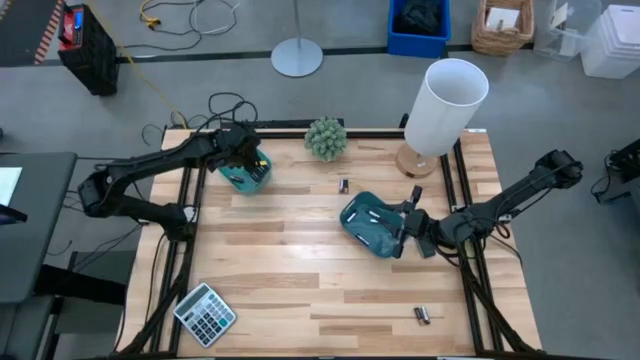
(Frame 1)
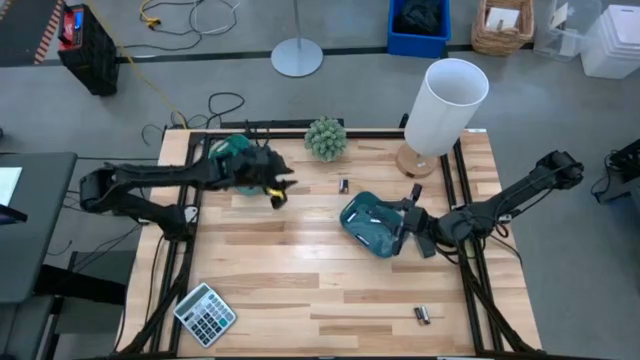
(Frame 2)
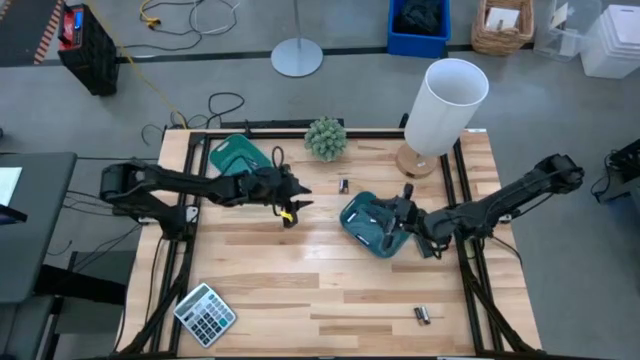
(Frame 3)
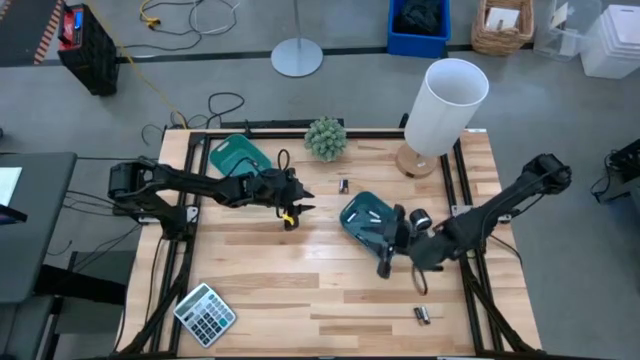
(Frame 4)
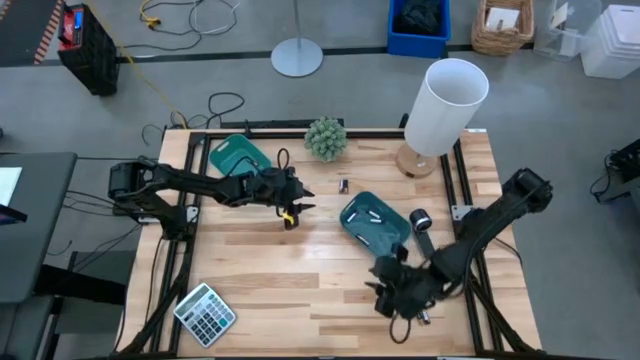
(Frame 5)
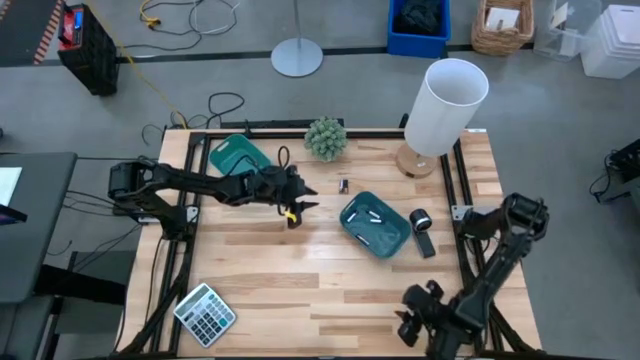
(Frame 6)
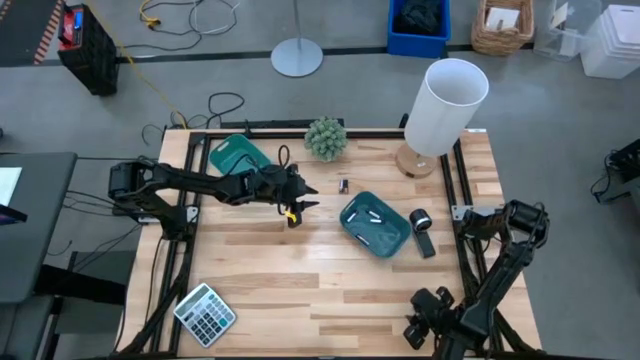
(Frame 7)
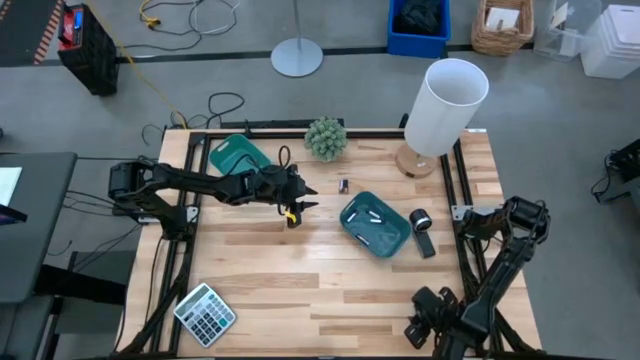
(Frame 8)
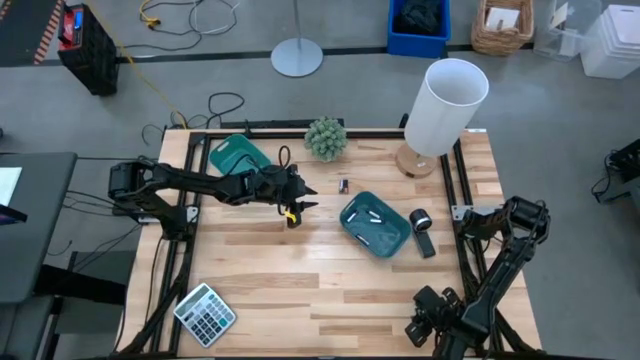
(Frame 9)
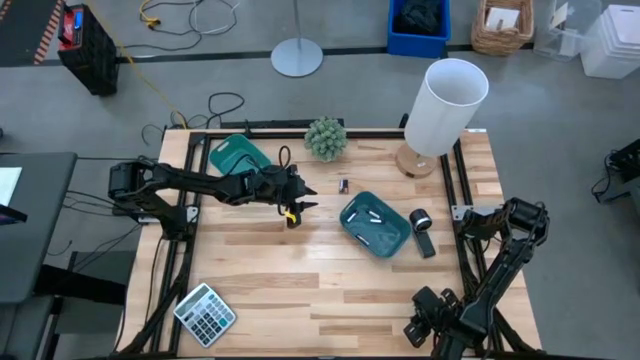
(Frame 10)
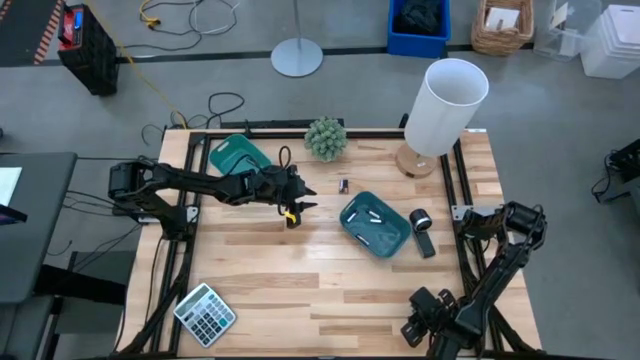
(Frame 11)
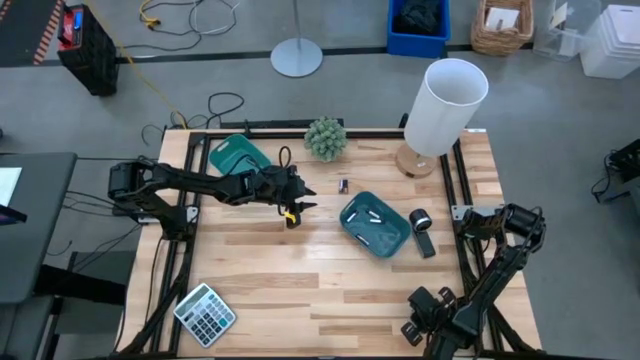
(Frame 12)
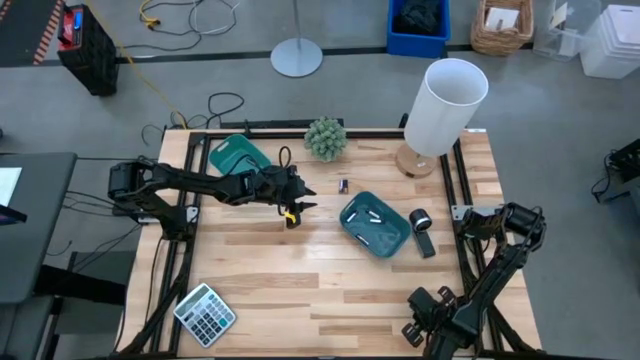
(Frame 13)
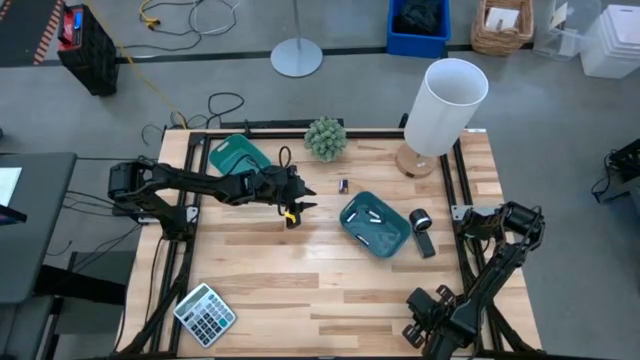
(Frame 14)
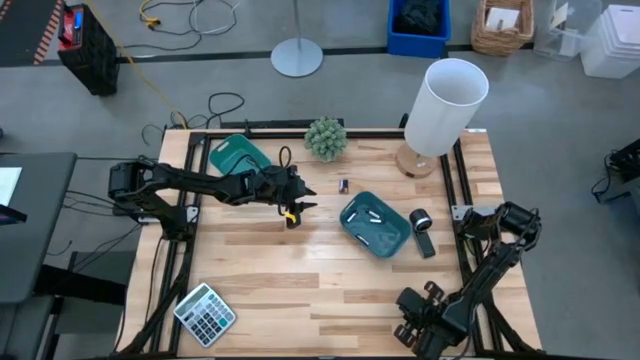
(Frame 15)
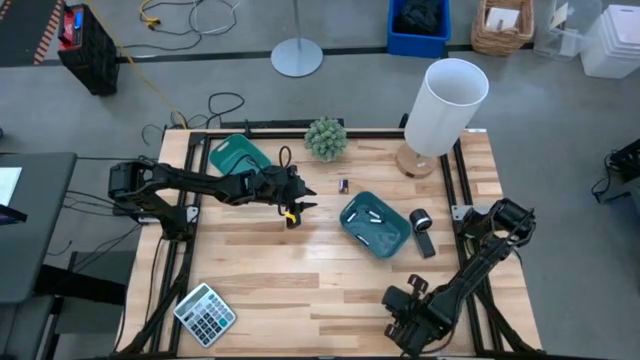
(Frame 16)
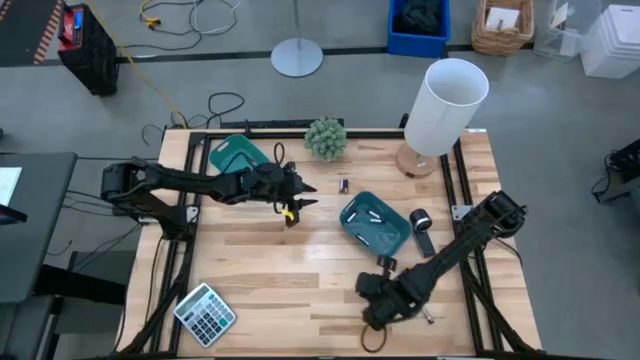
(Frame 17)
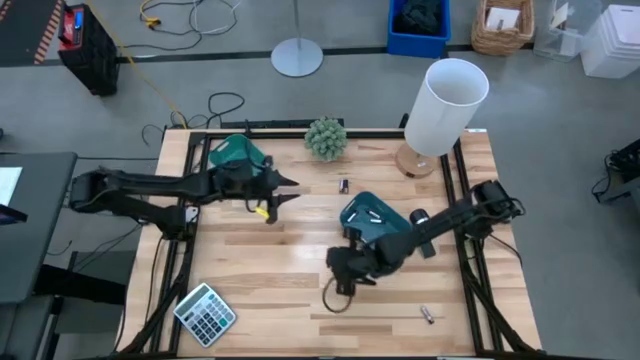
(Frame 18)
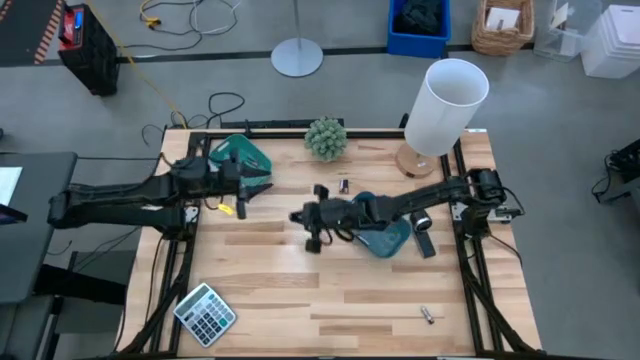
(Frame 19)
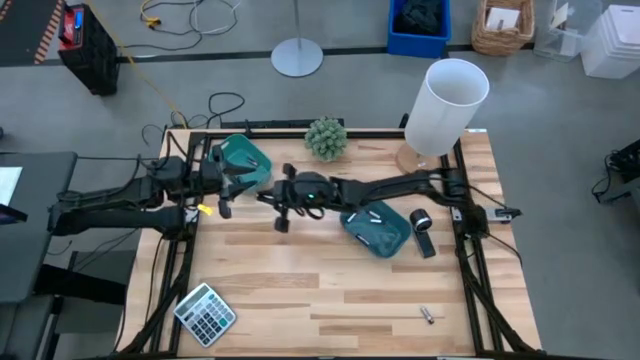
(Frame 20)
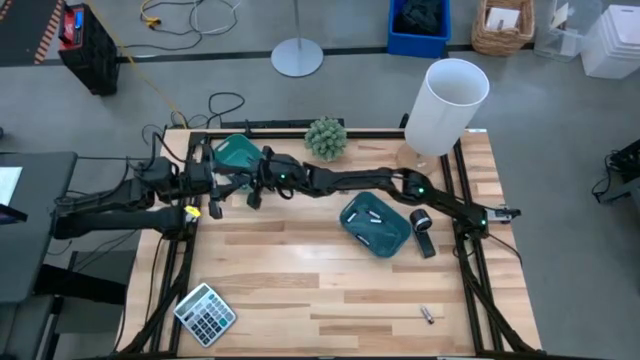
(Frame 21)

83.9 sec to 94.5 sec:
Task: Sort batteries
Put the black battery into the green bin

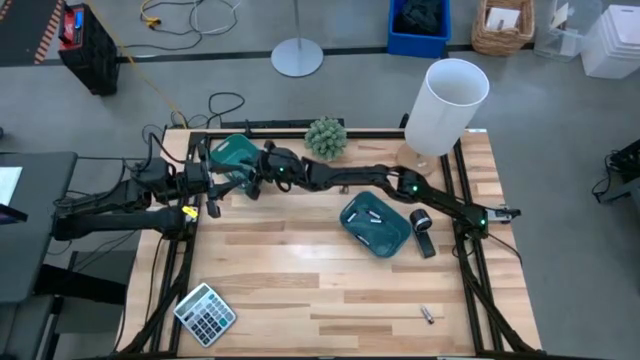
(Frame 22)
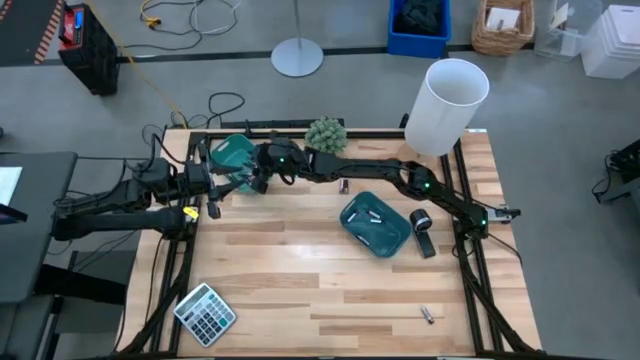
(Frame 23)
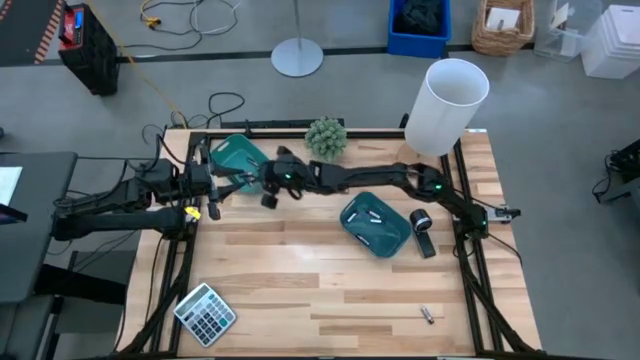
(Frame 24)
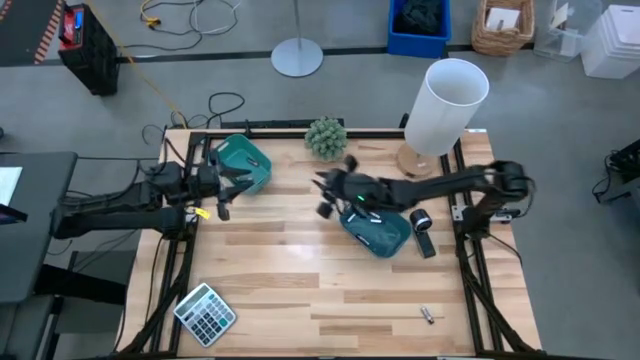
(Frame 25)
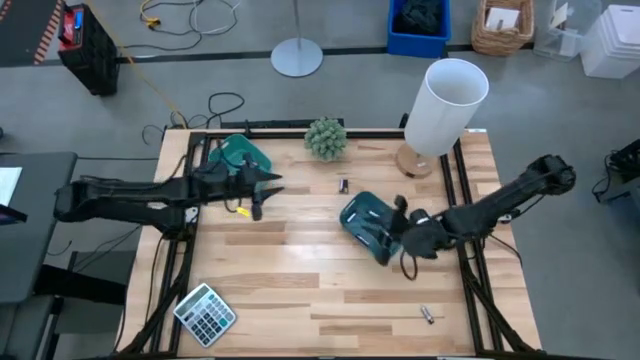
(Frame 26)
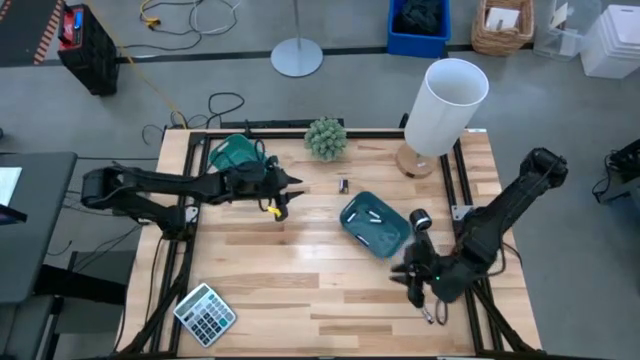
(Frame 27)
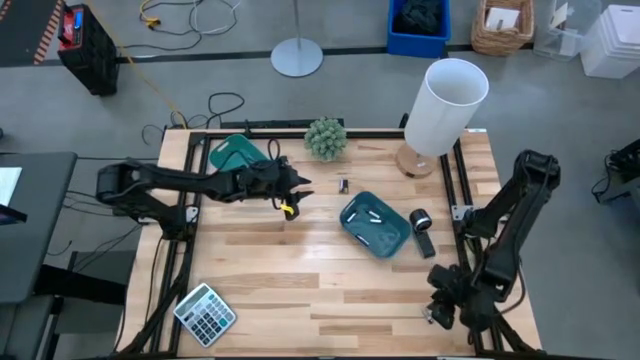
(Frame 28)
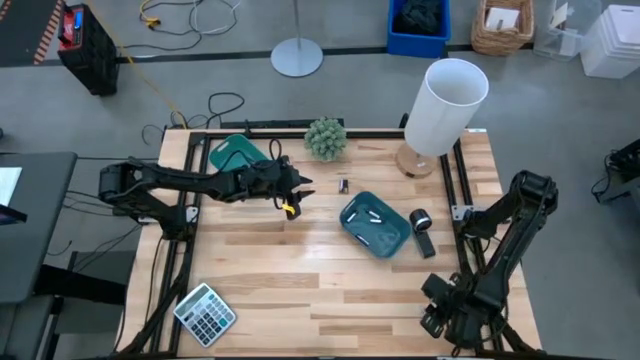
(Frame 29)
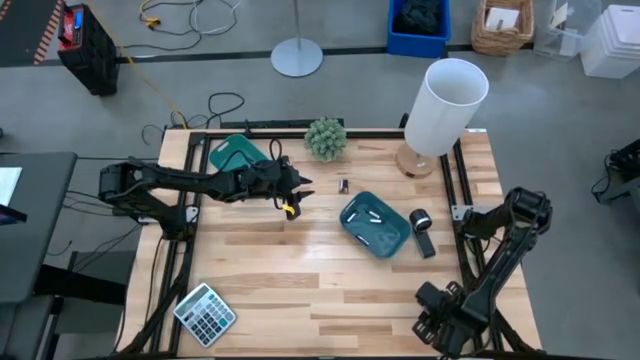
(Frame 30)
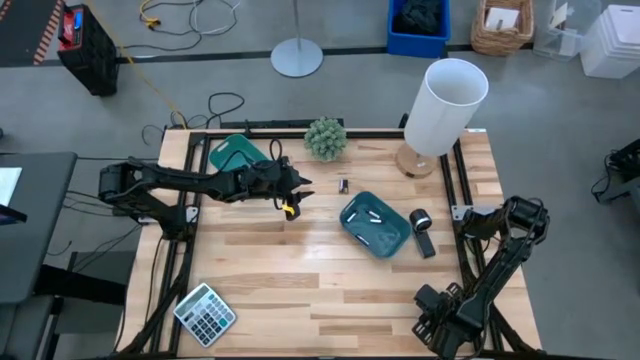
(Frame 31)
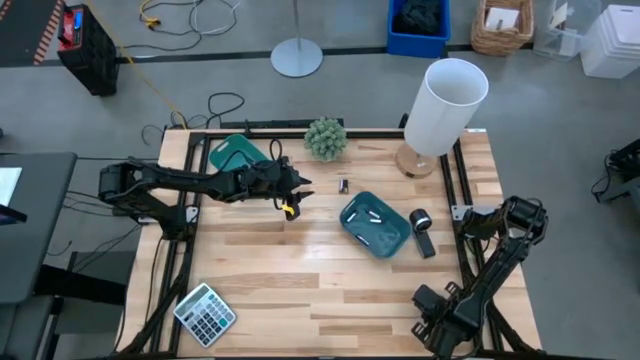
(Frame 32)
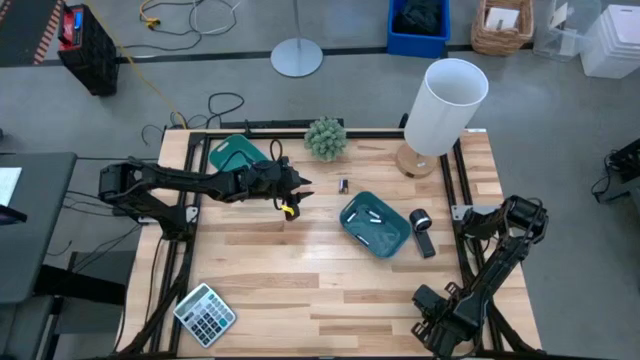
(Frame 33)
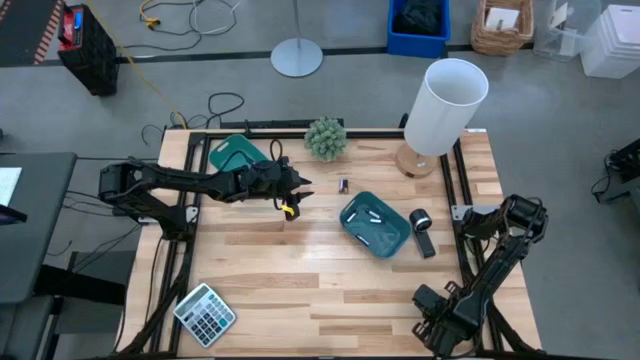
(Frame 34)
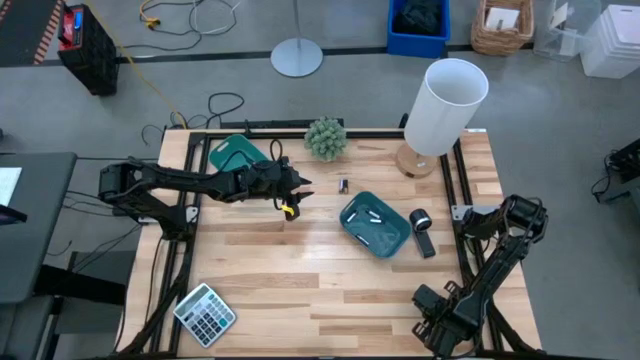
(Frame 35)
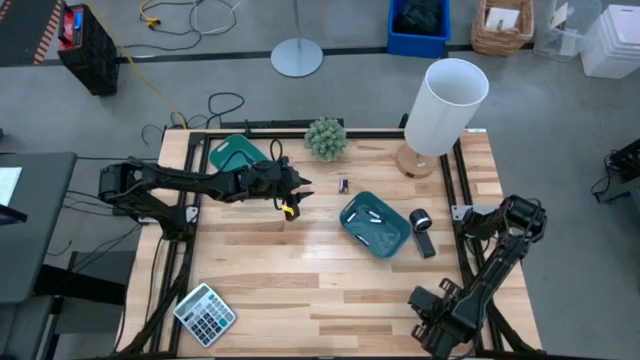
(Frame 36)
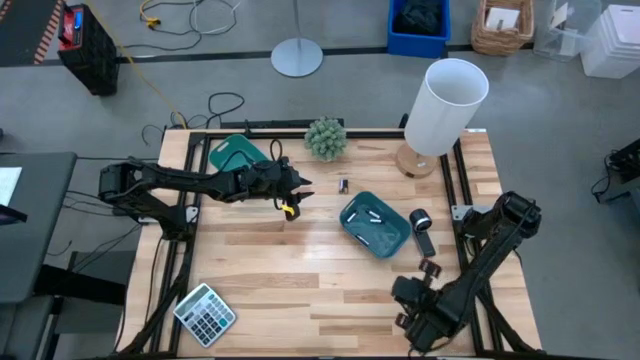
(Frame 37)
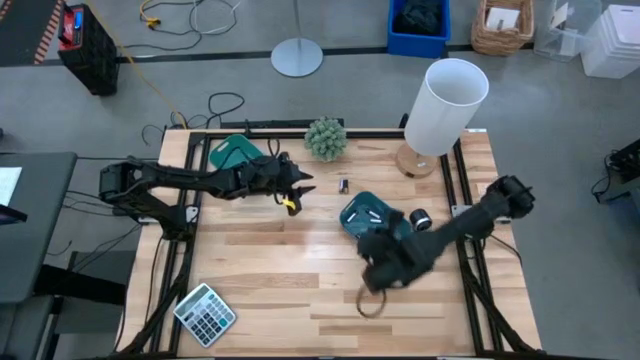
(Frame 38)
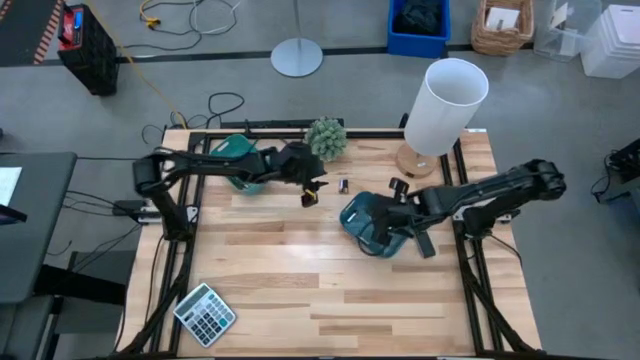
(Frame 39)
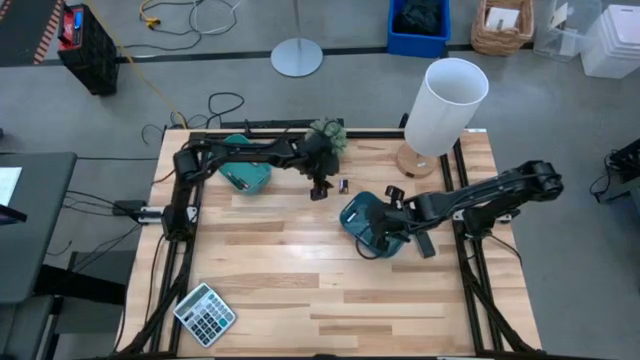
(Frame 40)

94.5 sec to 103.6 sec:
Put the silver battery into the blue bin
